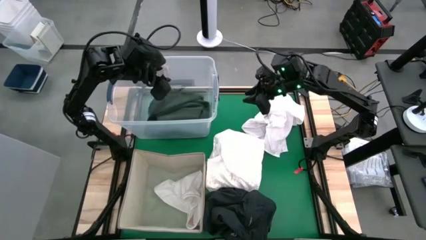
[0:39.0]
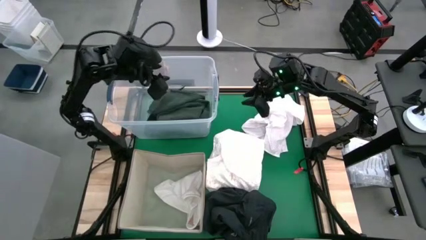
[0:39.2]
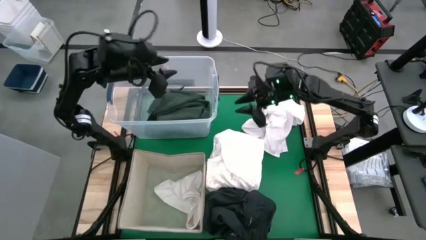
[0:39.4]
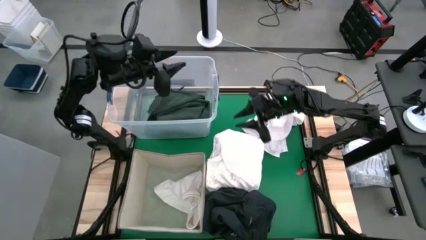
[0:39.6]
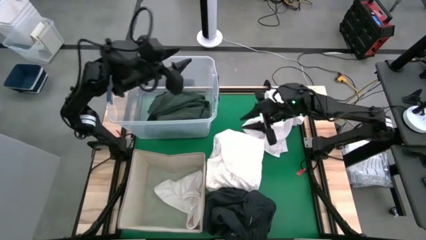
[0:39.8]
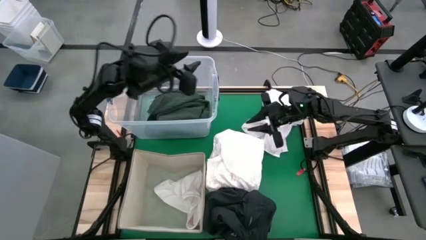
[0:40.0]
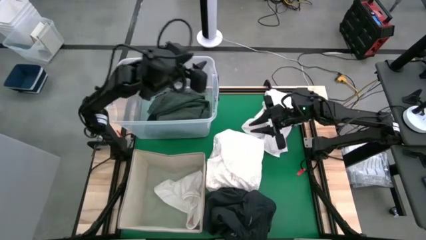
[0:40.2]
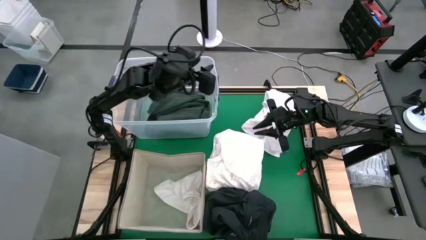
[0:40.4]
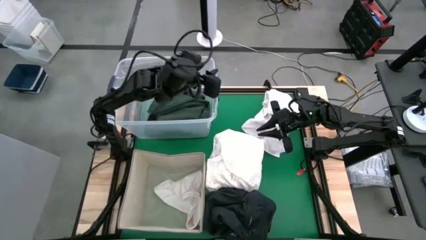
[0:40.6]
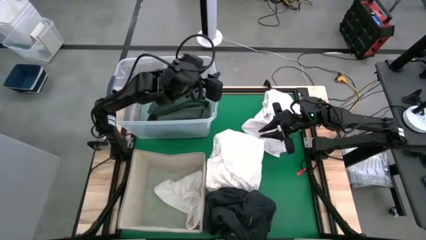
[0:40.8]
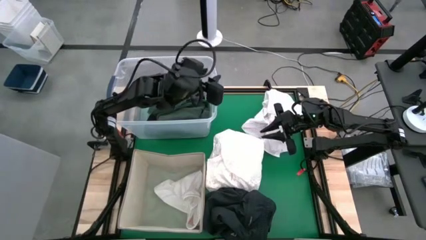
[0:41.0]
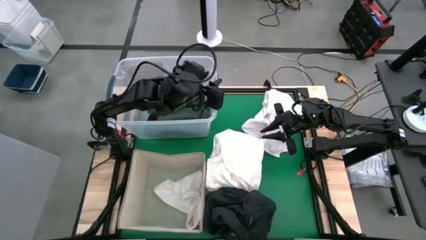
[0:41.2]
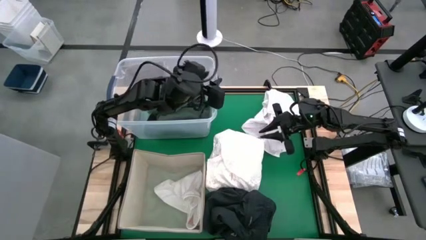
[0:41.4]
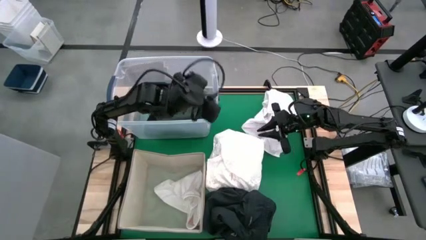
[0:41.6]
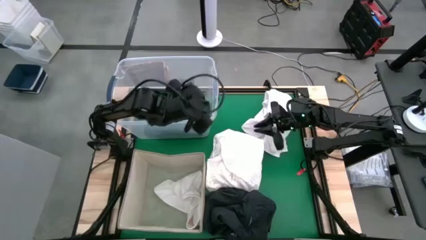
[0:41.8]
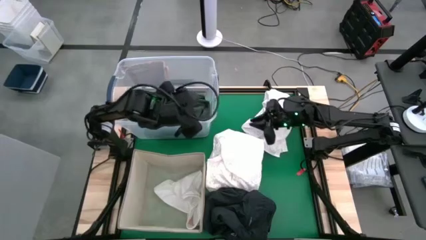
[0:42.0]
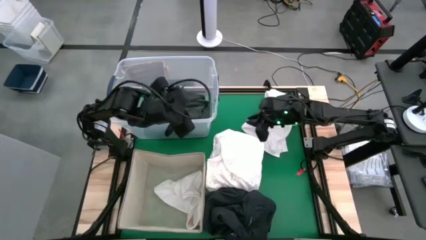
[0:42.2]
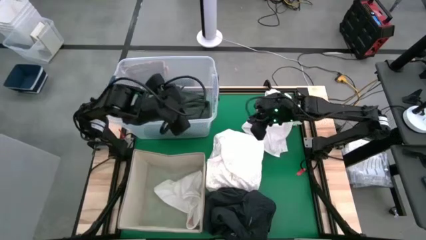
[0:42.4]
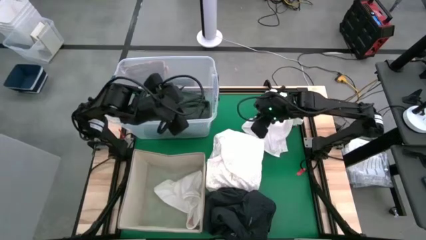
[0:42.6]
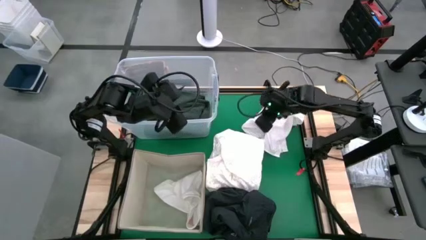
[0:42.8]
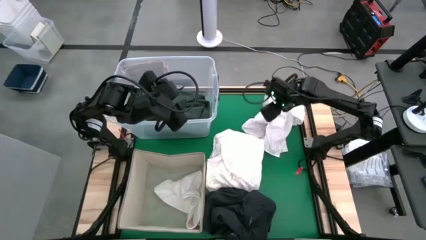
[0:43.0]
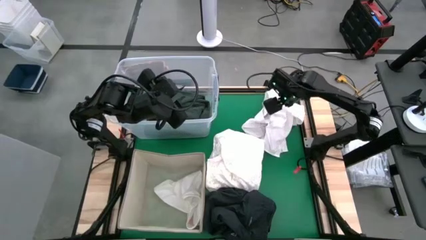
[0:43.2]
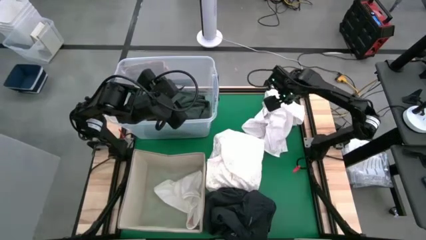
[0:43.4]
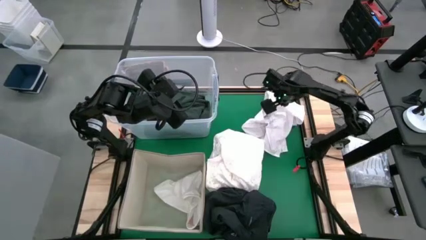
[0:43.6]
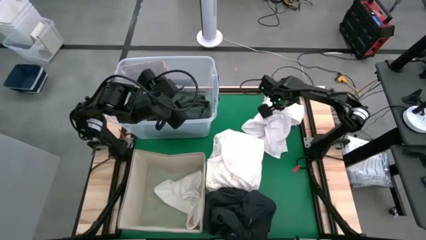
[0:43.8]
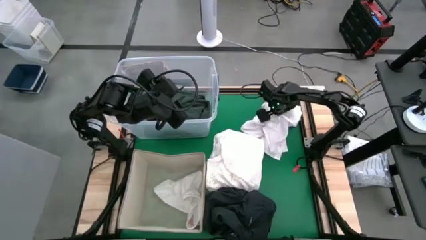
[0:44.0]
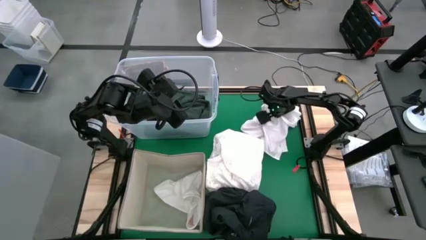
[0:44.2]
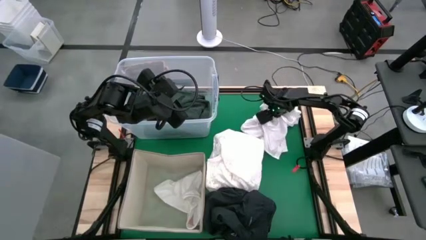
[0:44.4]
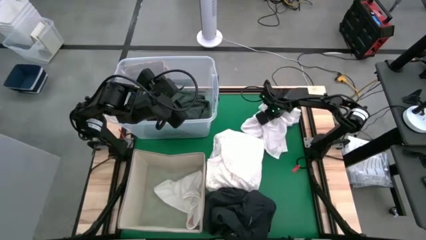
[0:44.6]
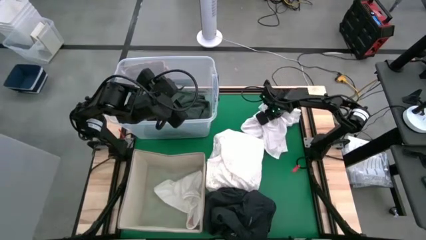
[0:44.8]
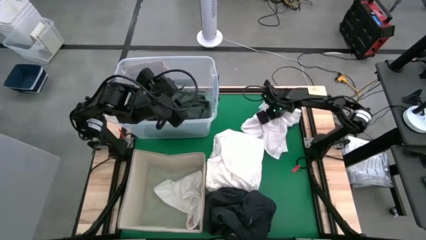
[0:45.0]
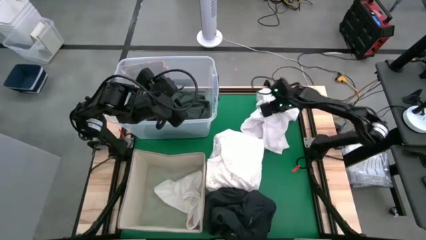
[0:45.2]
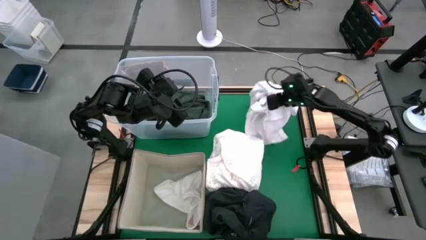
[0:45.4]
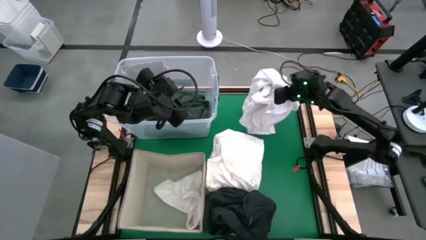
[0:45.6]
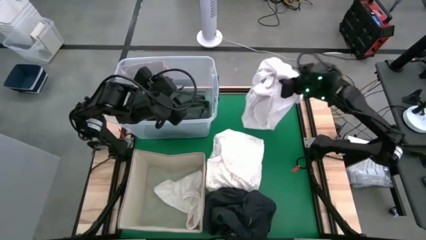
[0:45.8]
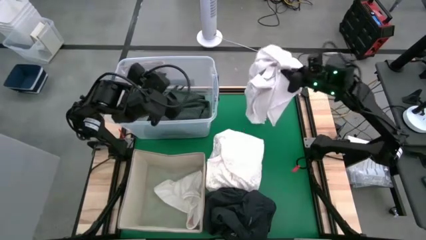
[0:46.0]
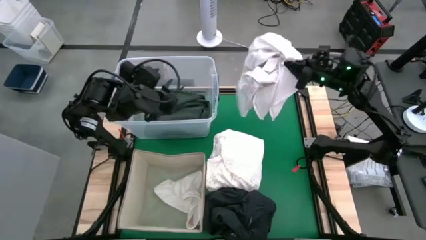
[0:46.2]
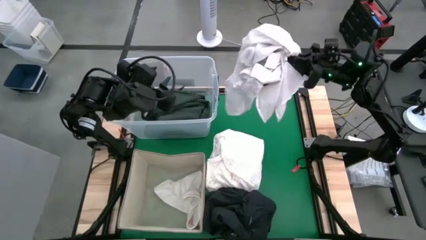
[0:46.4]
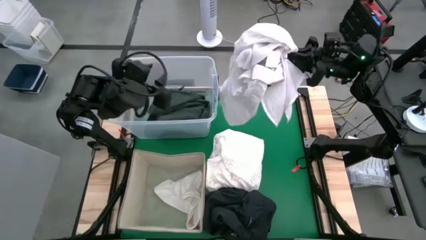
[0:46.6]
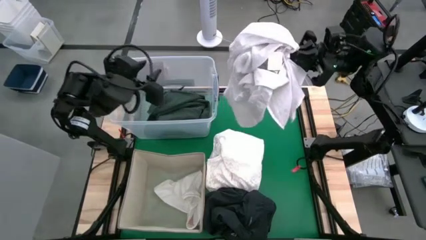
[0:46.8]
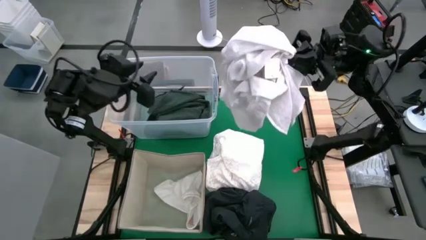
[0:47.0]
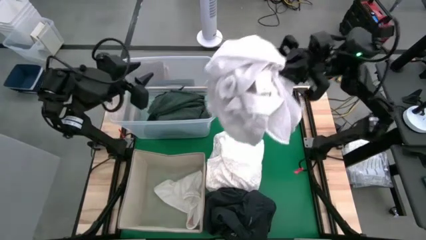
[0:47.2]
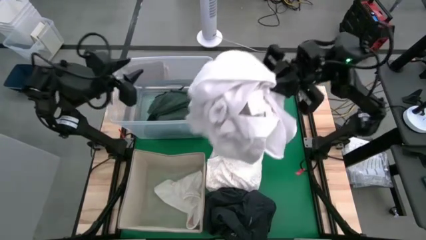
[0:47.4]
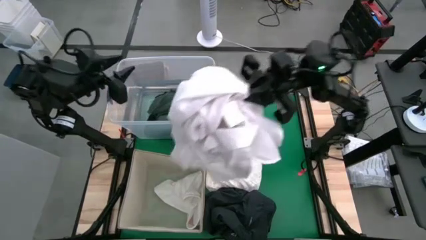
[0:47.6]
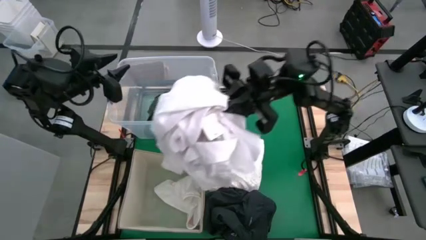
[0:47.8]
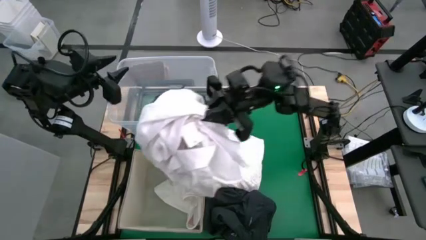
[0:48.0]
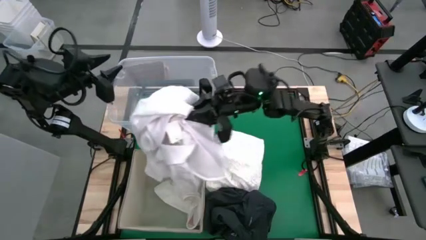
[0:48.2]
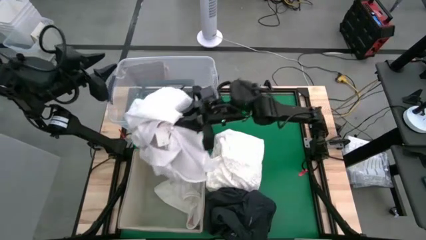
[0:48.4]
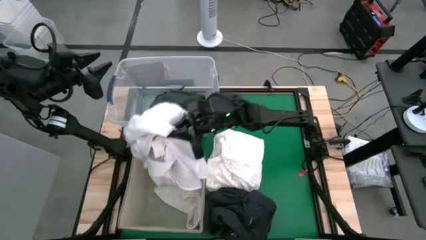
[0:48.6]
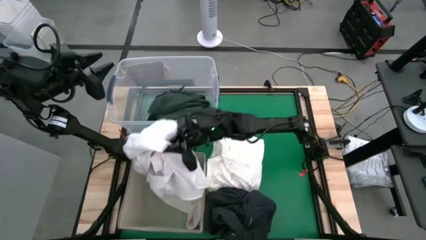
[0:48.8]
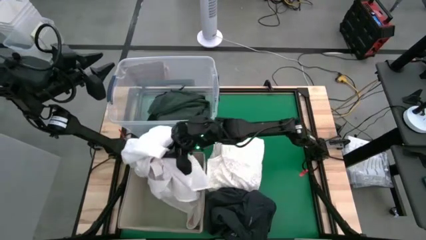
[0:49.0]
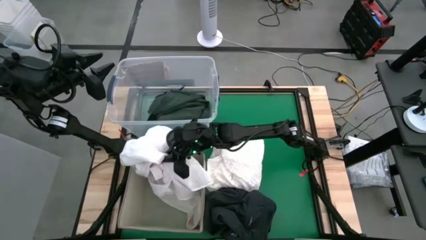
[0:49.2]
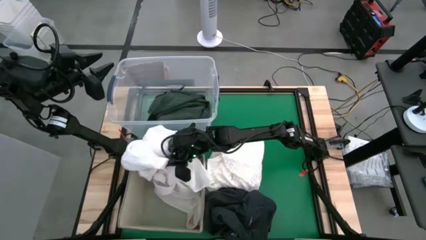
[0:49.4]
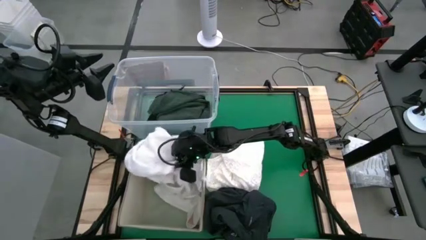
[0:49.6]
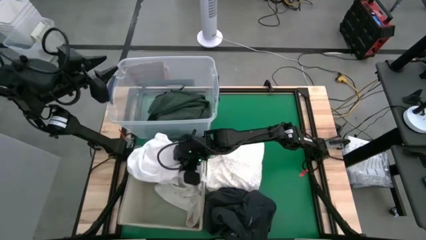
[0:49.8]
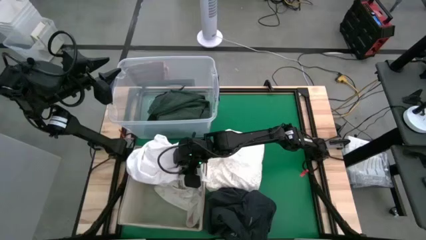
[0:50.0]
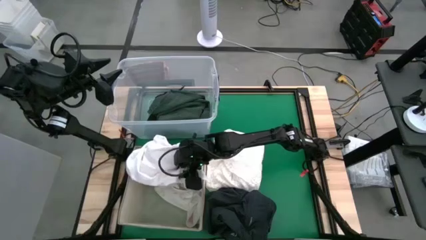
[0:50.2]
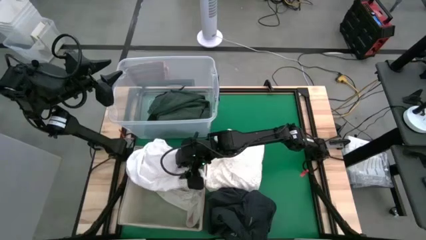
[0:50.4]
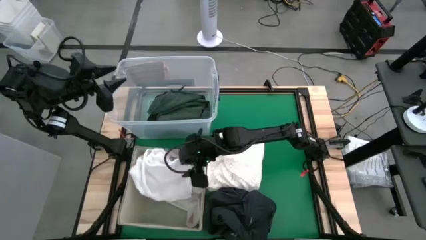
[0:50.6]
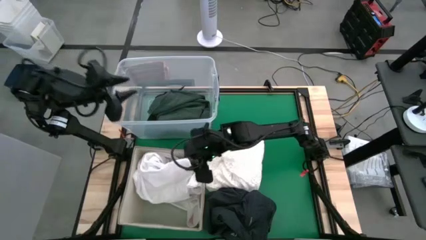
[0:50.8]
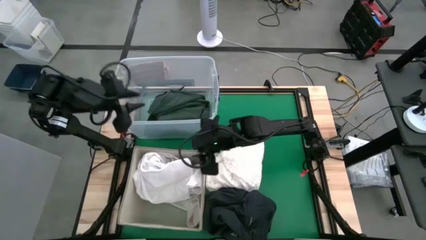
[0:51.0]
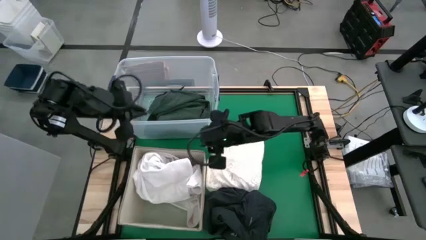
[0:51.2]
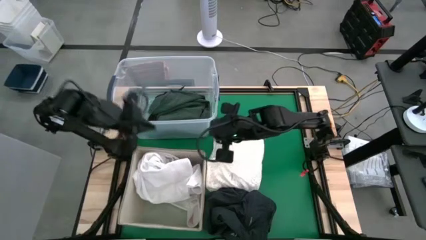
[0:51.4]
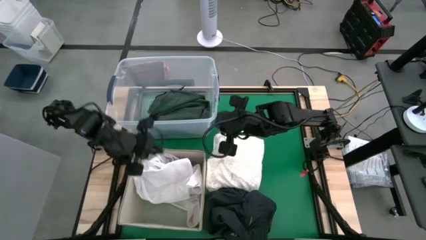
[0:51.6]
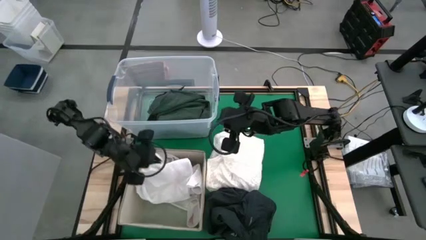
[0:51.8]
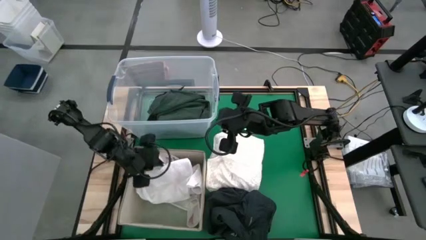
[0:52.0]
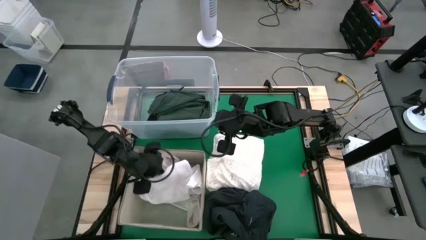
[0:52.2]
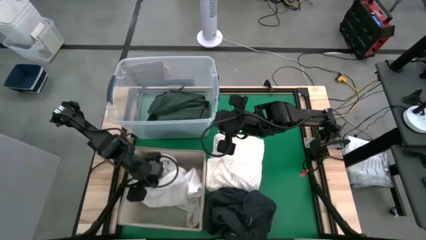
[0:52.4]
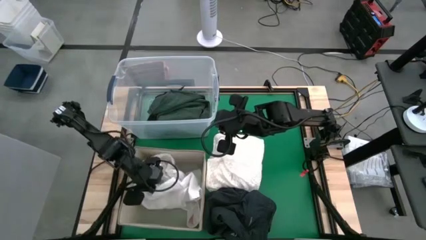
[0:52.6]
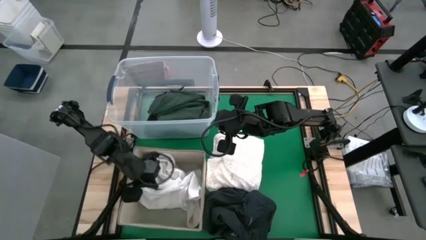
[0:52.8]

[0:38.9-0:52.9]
Task: Sort clothes
Put the top white polo shirt into the brown bin

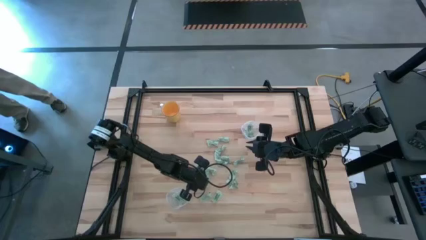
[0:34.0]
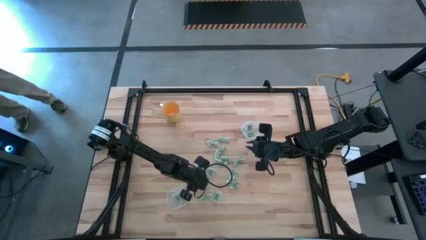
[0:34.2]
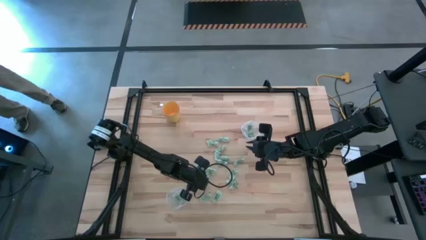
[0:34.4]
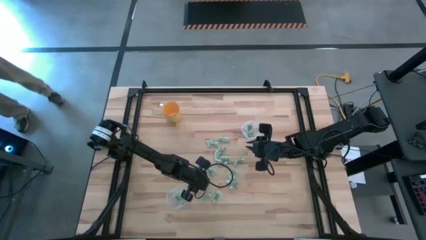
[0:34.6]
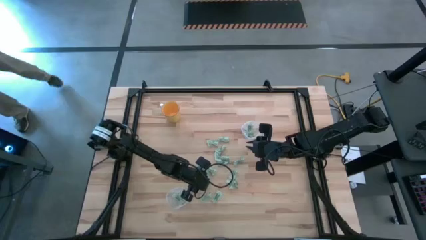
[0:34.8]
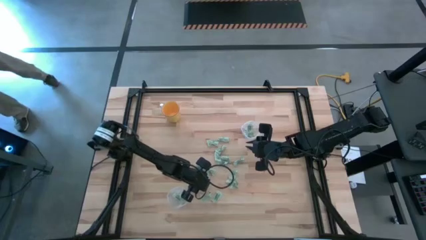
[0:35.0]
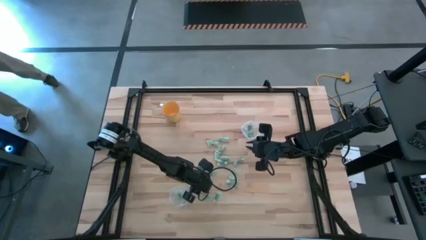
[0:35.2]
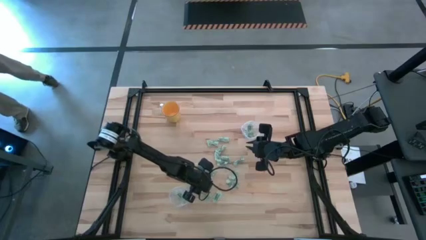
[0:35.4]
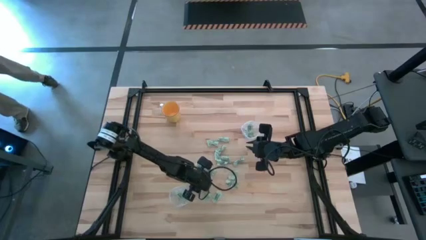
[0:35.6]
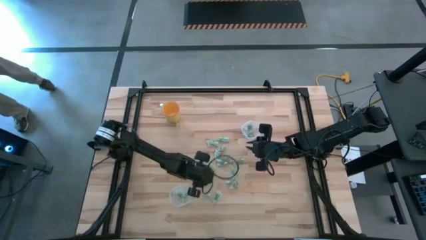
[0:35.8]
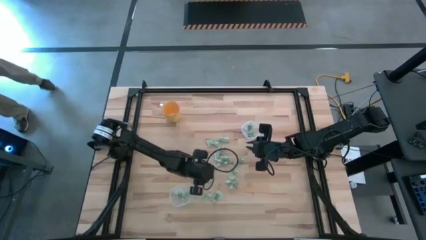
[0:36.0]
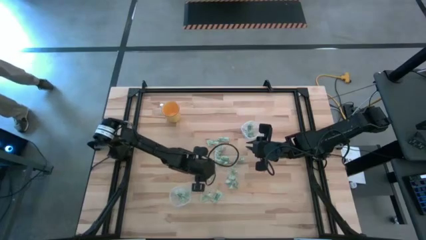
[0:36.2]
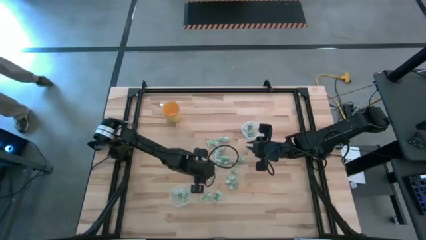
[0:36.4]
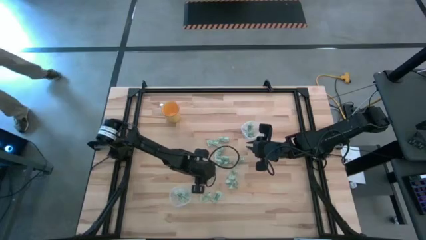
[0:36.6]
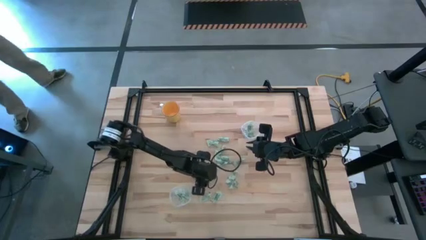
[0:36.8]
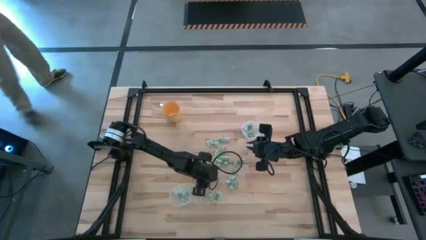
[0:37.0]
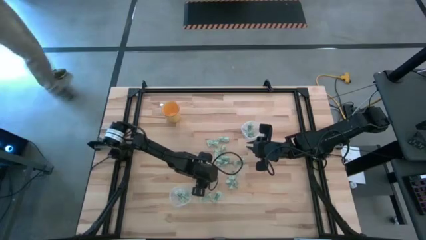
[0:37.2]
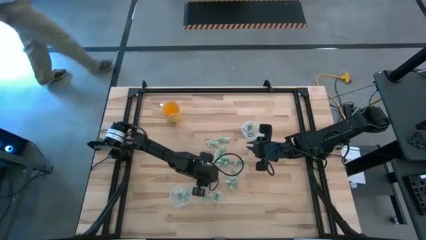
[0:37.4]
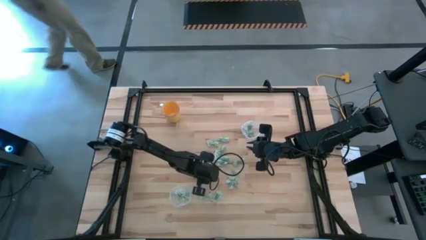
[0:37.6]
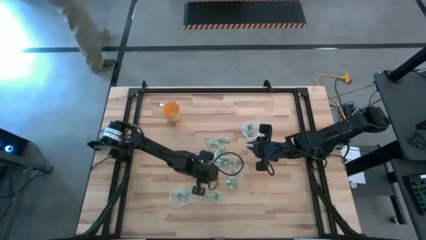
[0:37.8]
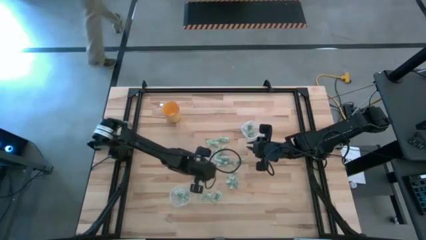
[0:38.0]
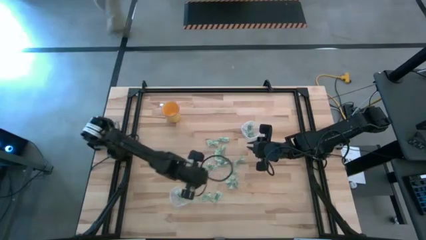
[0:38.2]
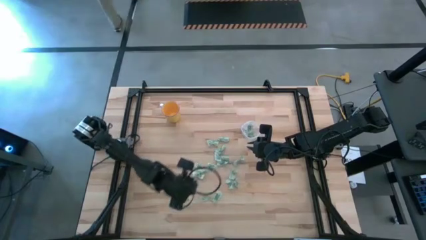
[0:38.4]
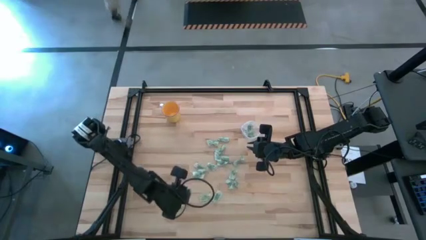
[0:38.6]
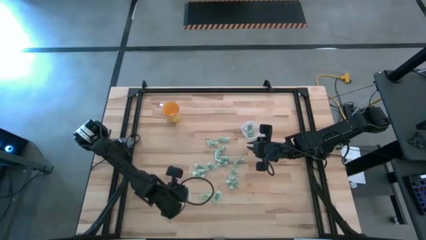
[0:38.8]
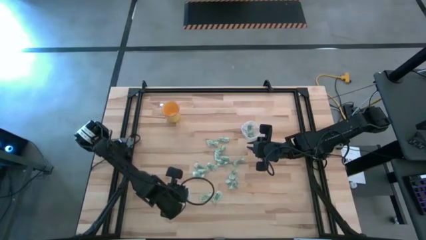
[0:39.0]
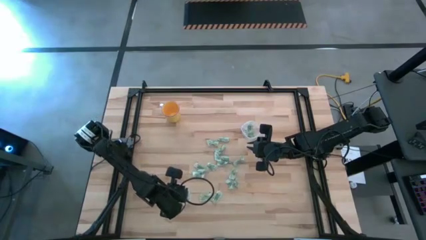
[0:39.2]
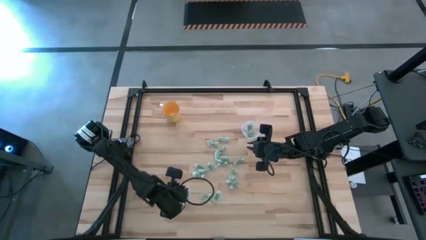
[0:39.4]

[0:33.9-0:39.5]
Task: Pick and place Stevia / Truvia into bins
Put the green stevia packet into the bottom transparent container
